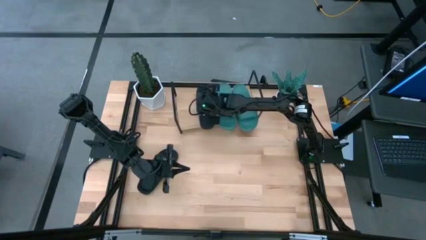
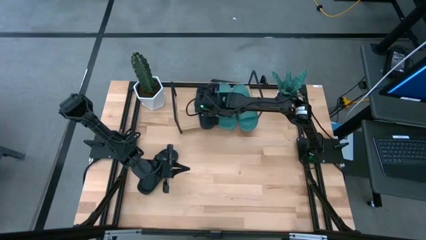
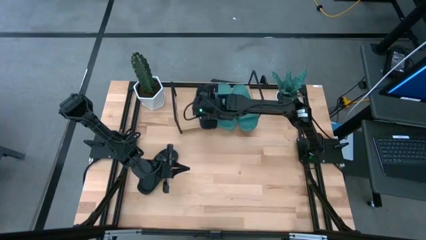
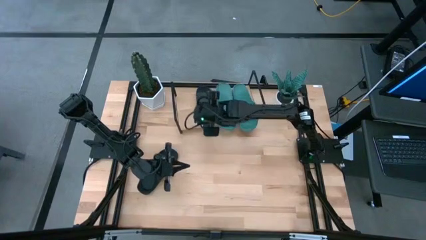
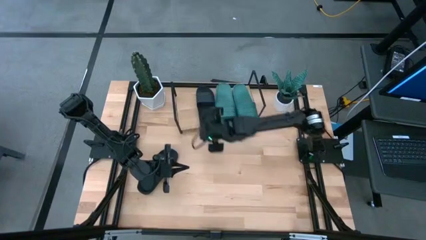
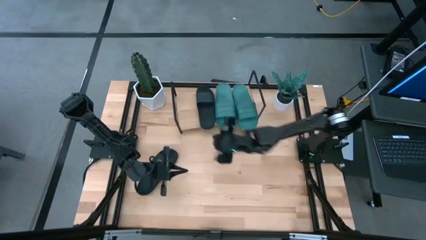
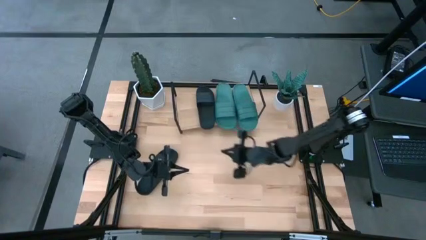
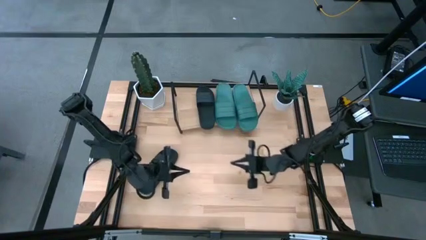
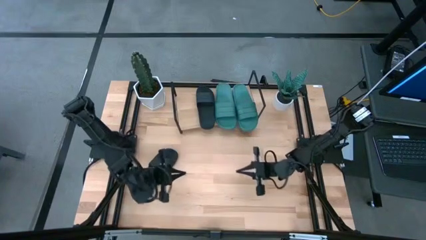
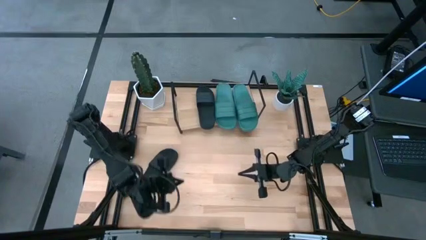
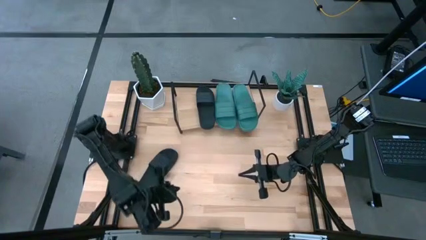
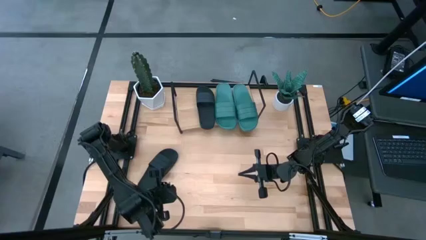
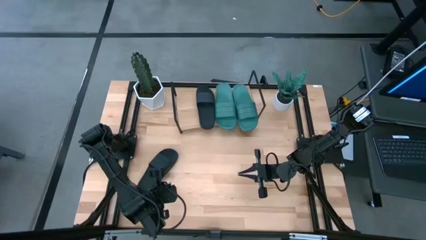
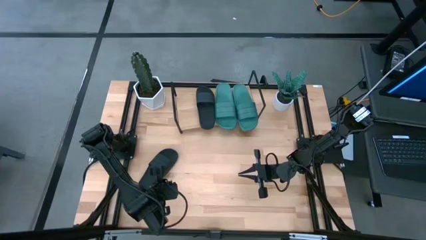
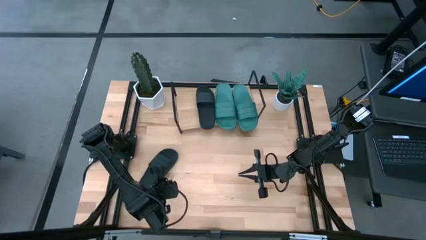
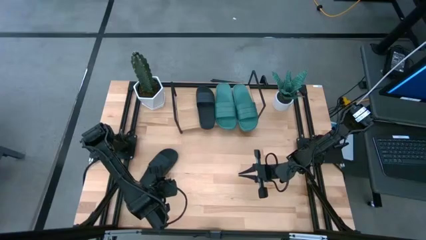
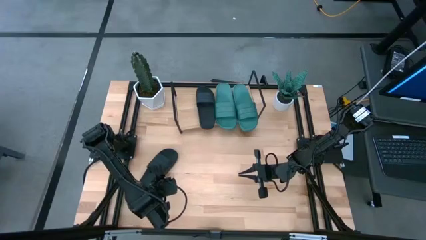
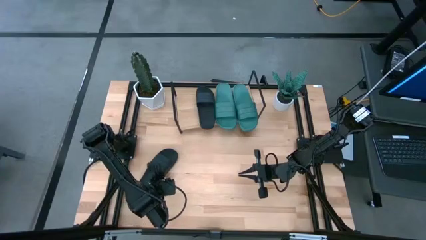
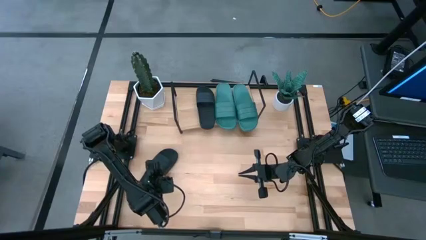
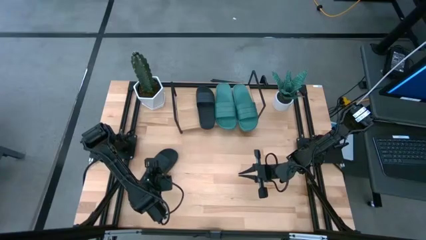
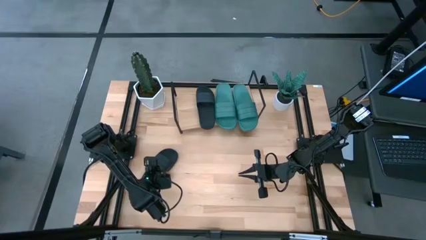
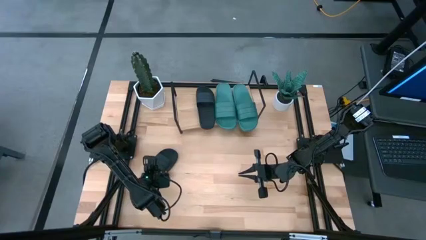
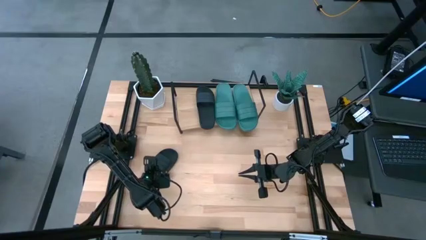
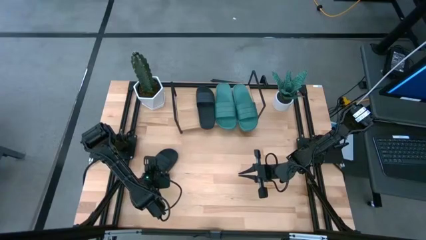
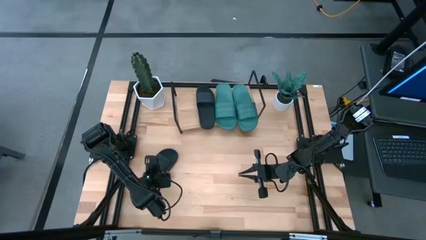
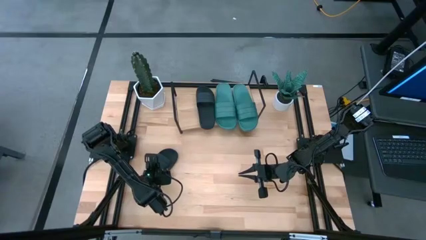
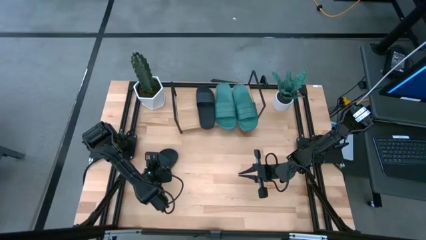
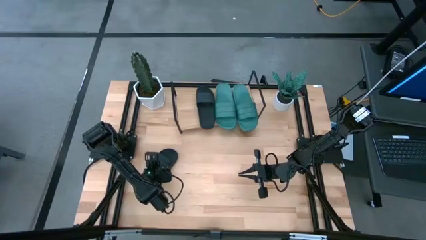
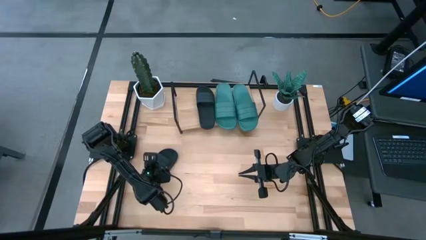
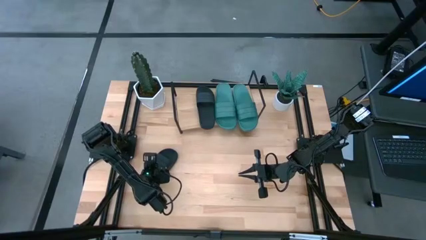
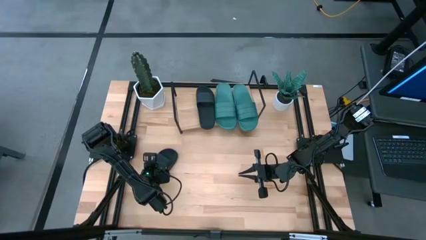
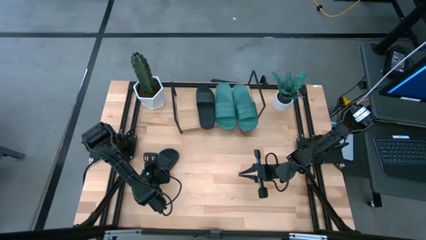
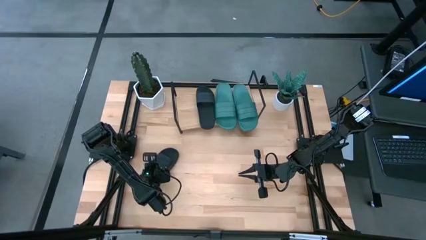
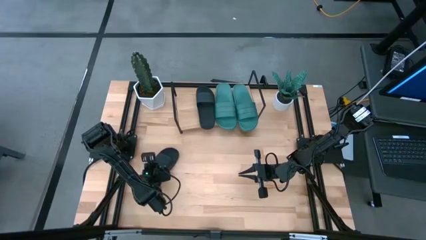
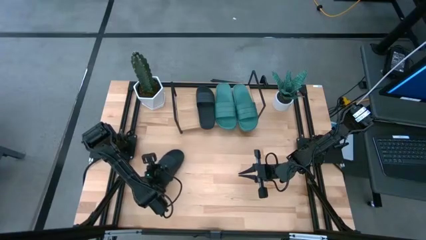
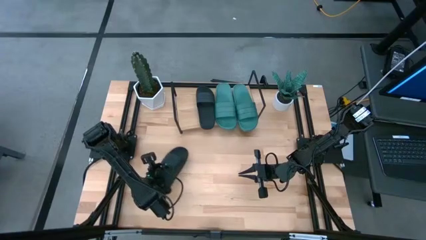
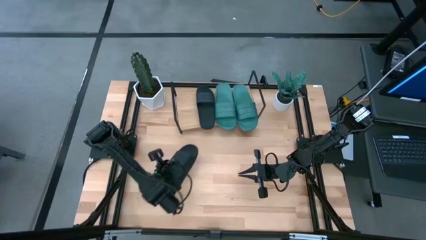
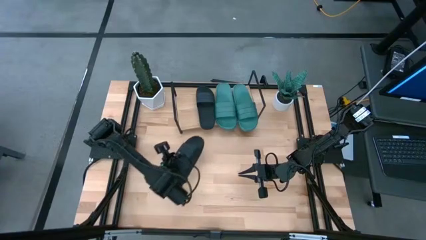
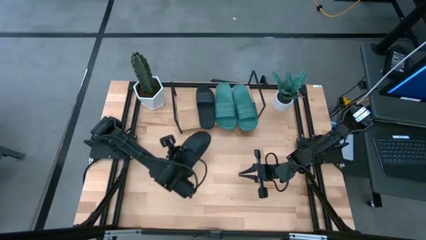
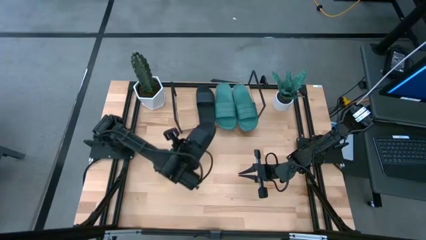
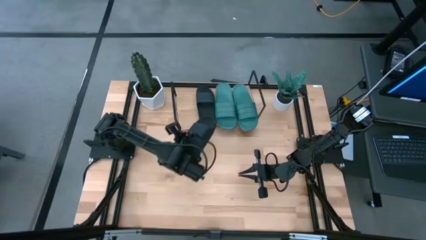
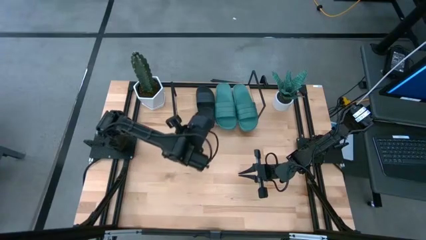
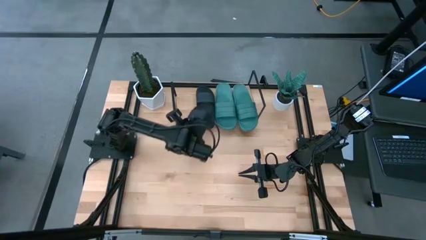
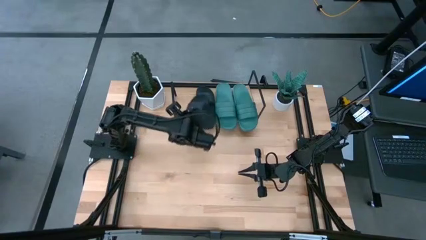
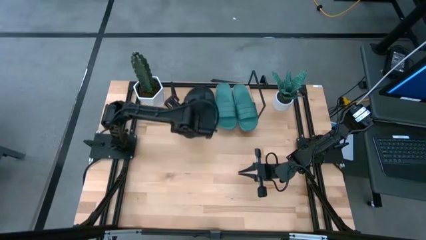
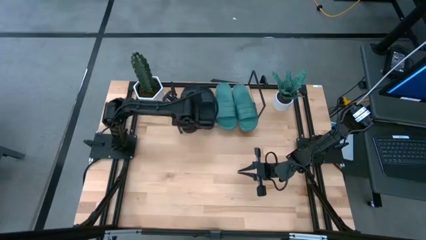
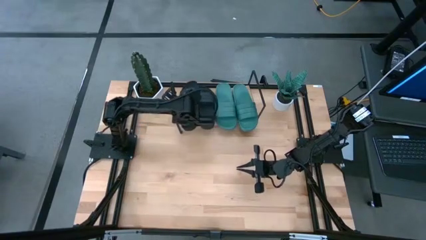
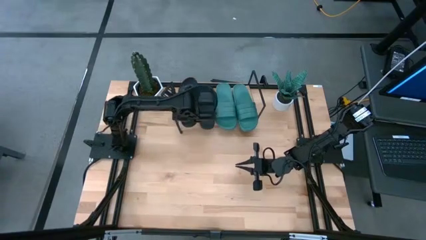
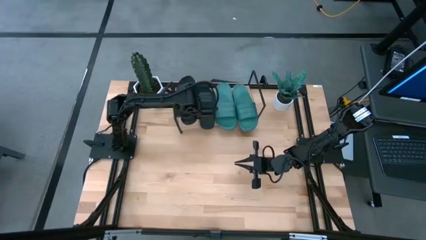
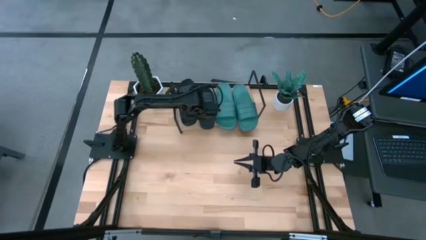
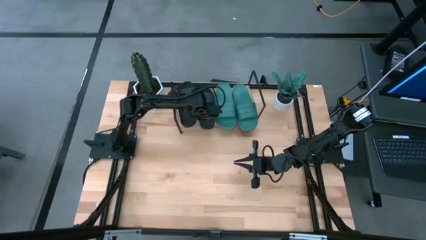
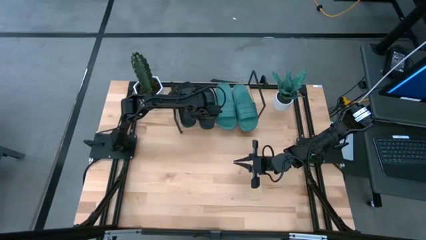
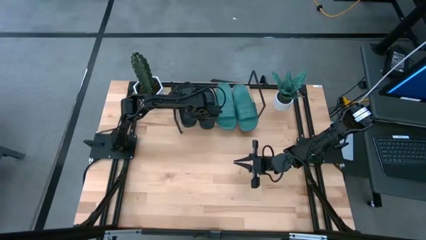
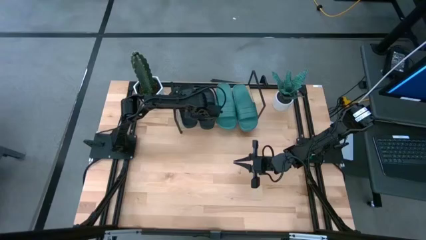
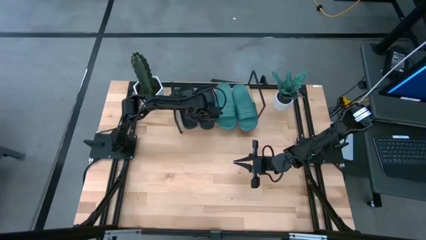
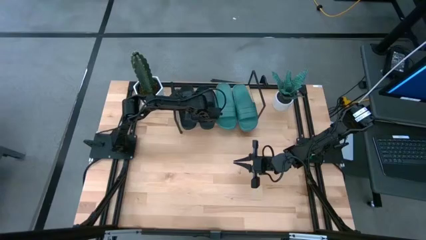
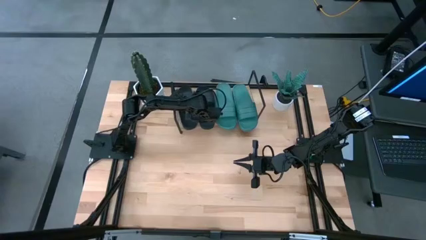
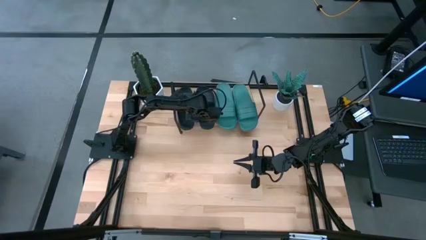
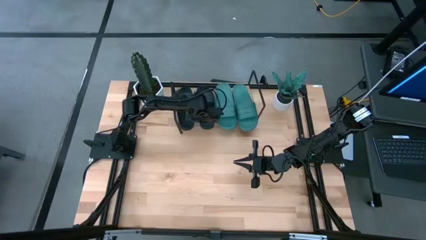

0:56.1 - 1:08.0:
Task: Pick and place slides into the shelf
Put the black slide on the shelf

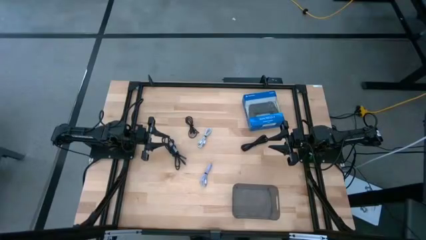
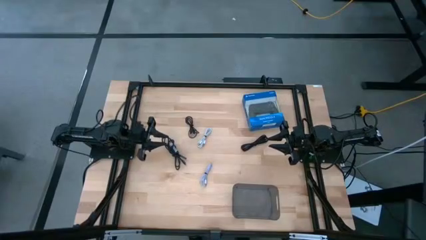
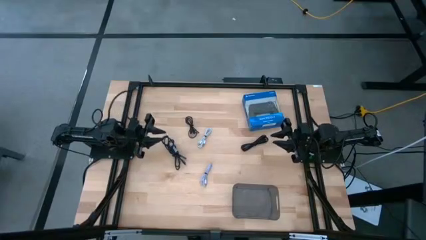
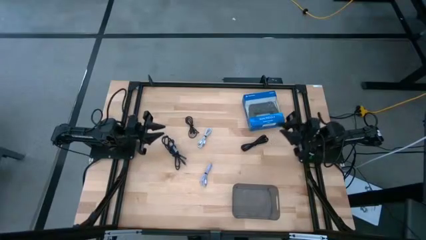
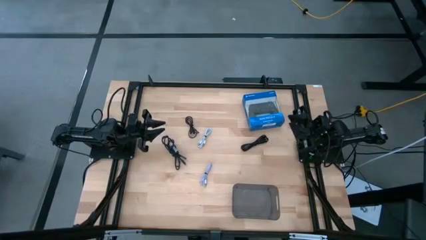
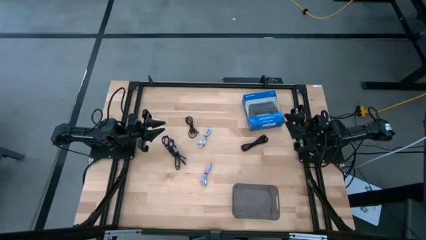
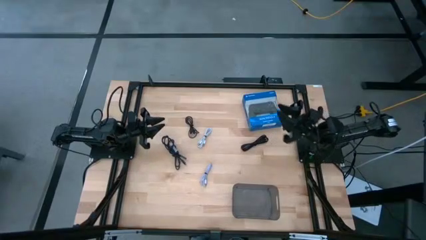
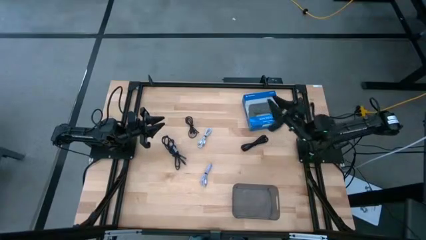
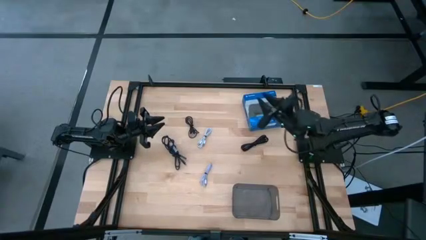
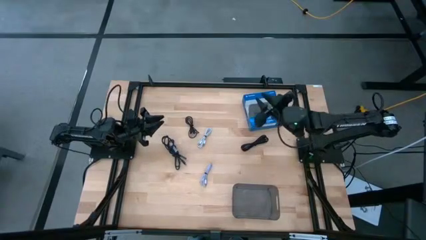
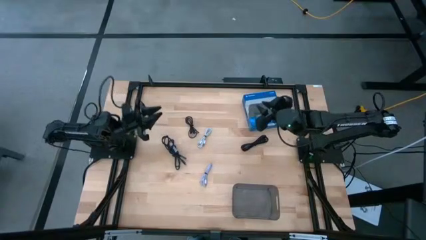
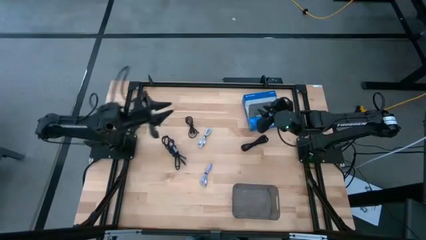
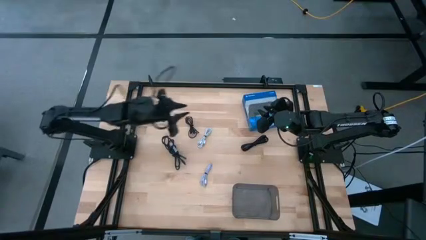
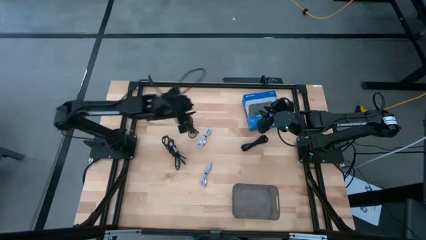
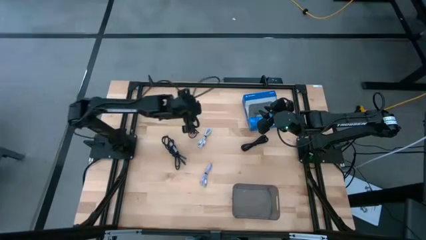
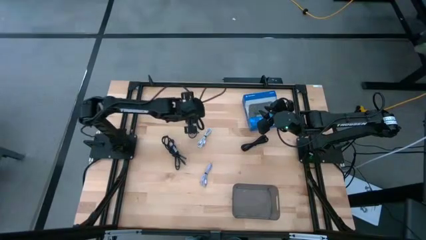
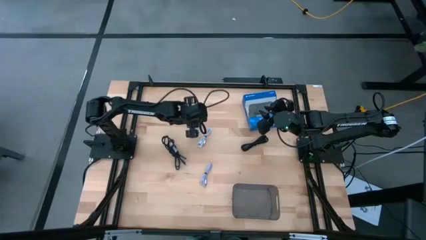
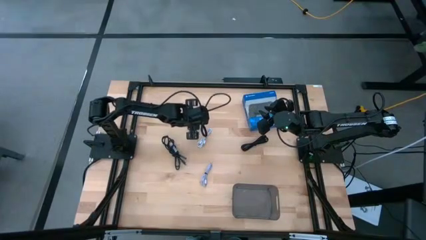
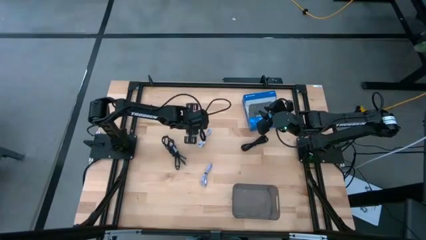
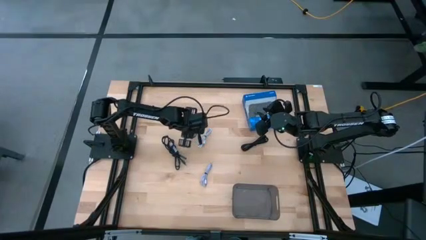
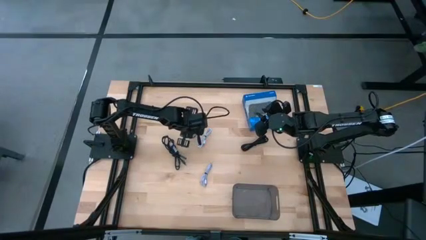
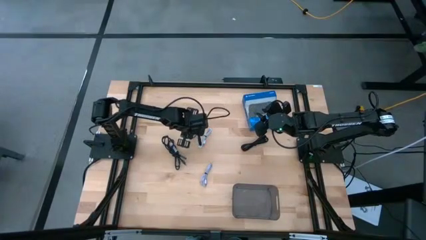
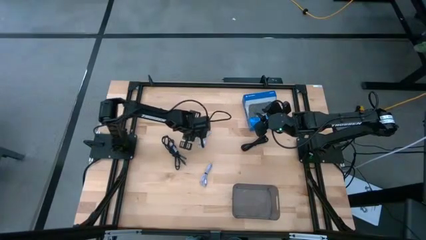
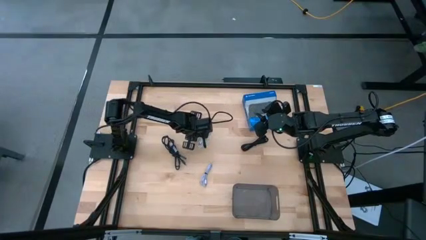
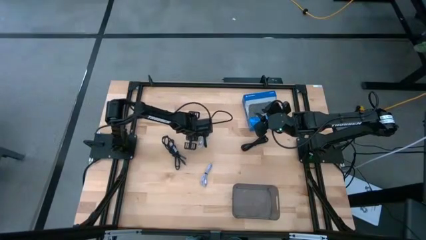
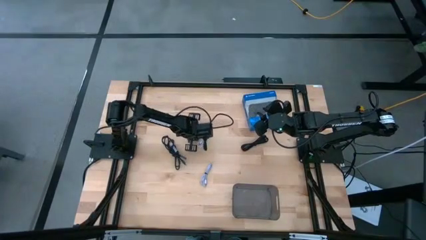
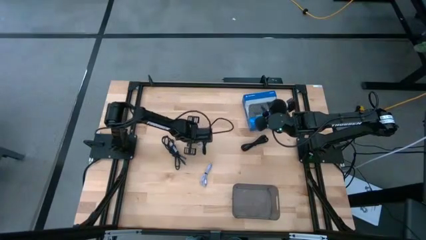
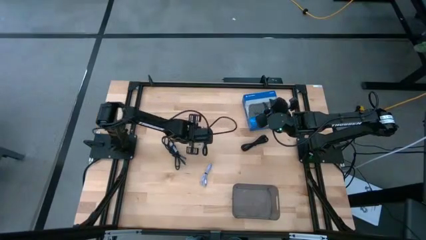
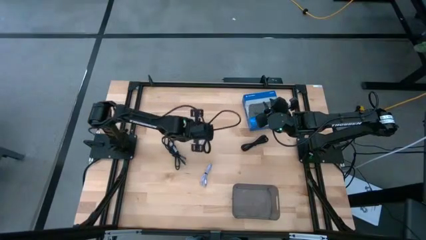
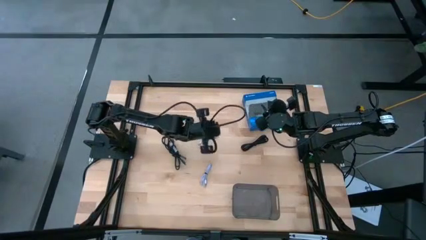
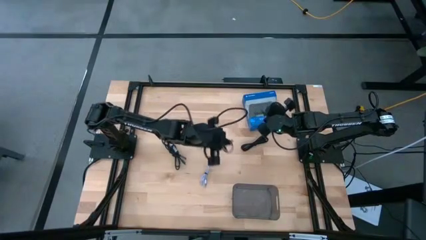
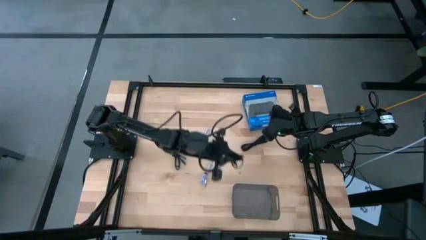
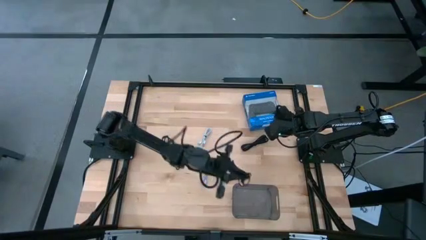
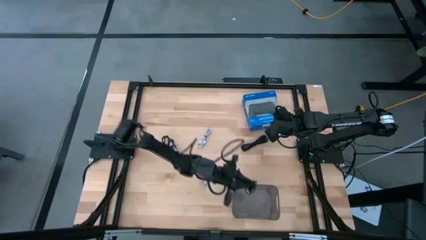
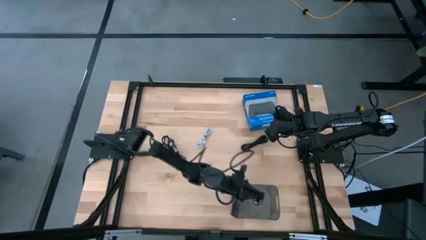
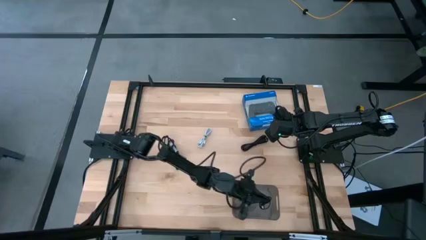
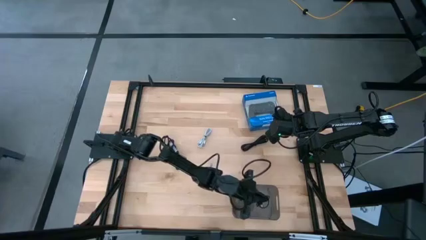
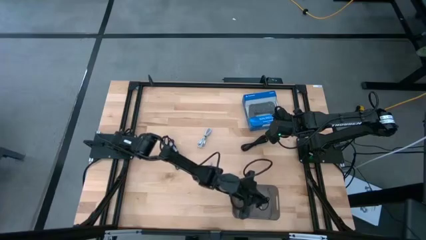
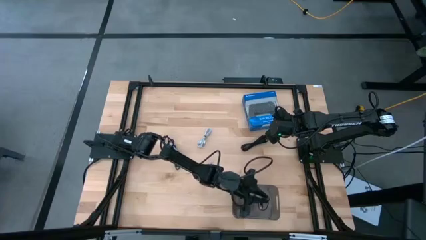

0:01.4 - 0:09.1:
Task: Pick and place USB-C Cables
Put the middle black charger cable into the black bin
